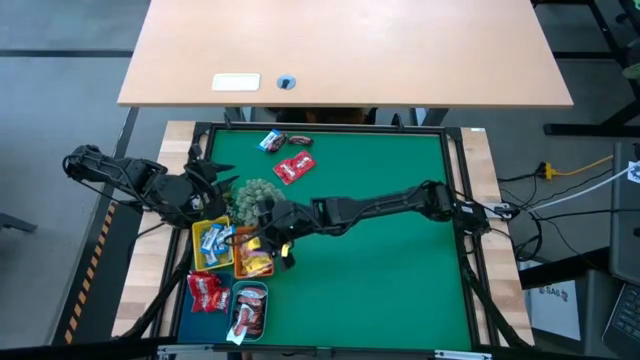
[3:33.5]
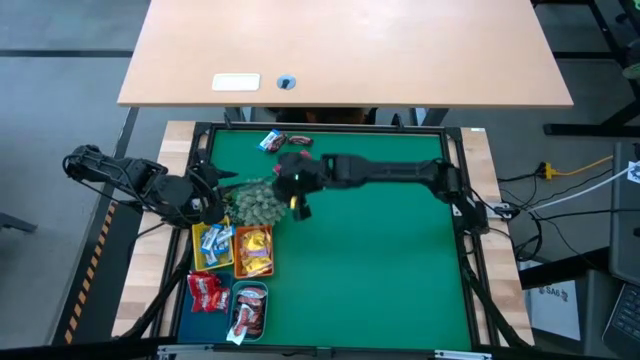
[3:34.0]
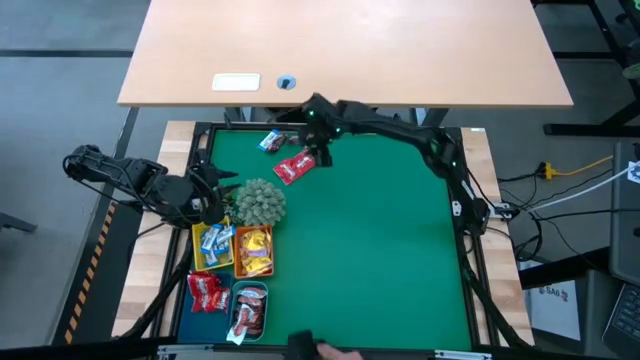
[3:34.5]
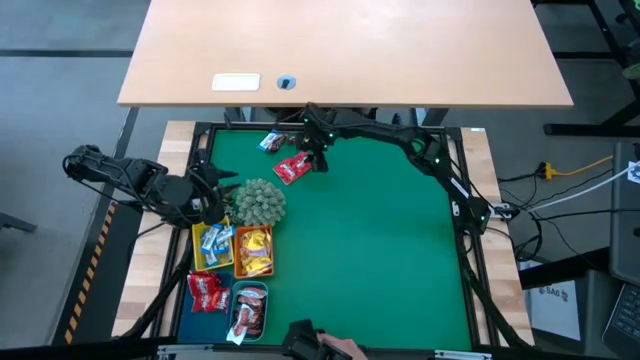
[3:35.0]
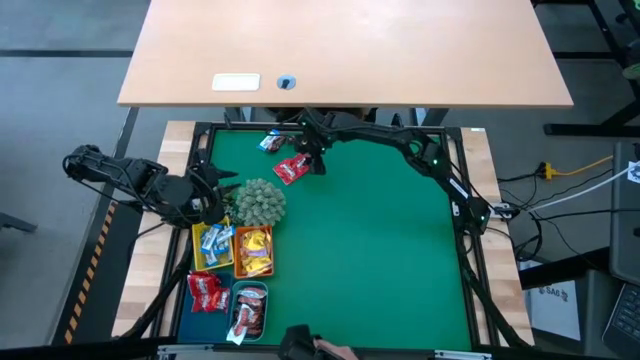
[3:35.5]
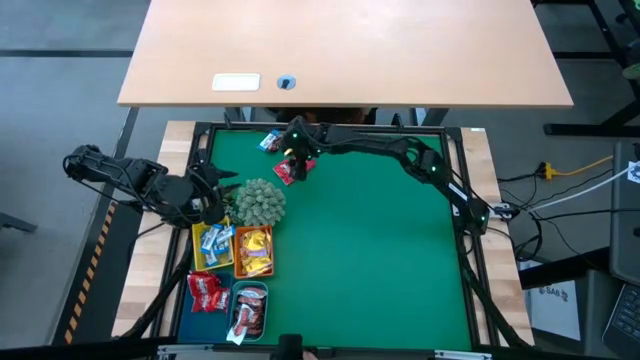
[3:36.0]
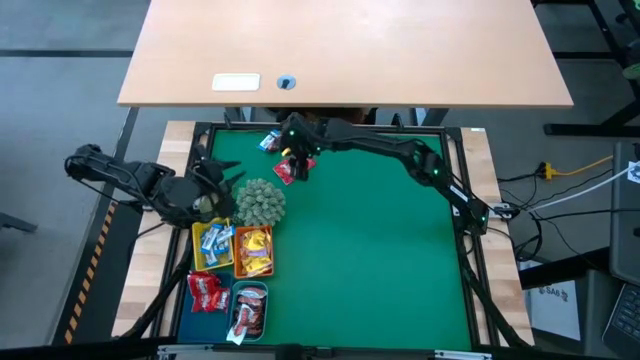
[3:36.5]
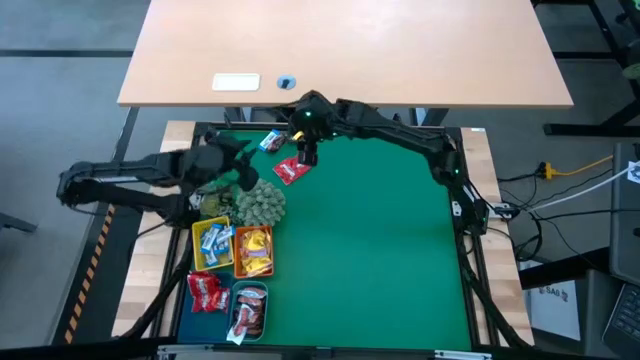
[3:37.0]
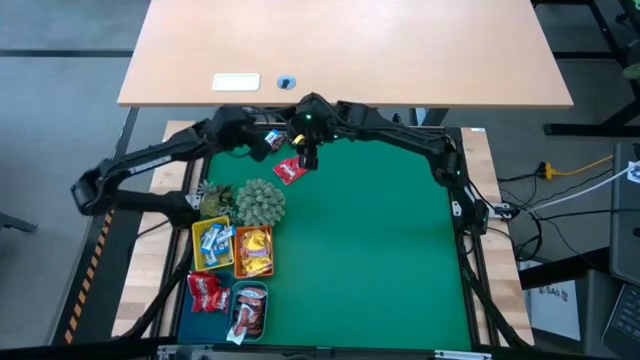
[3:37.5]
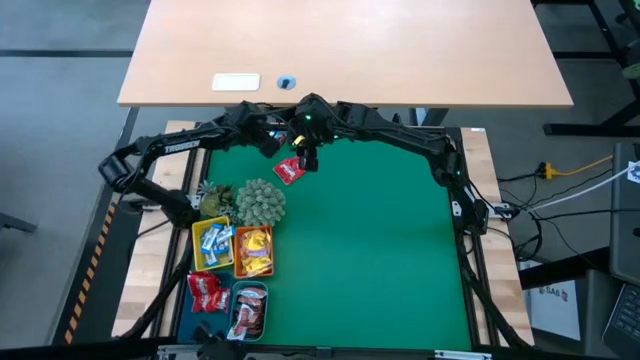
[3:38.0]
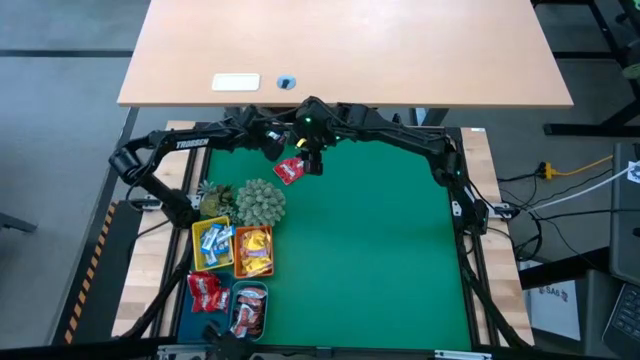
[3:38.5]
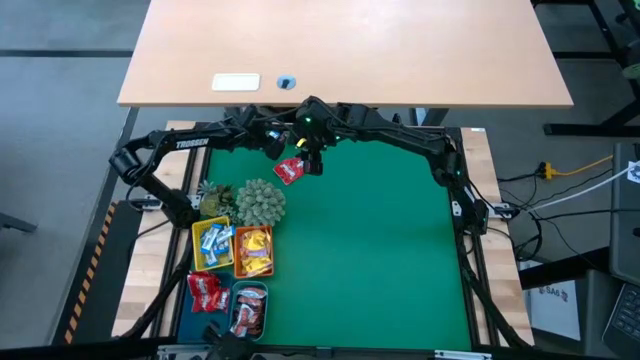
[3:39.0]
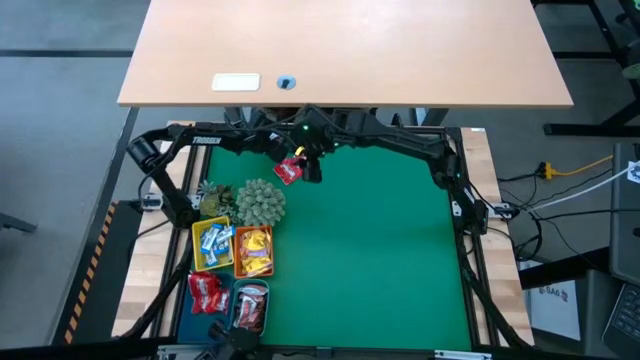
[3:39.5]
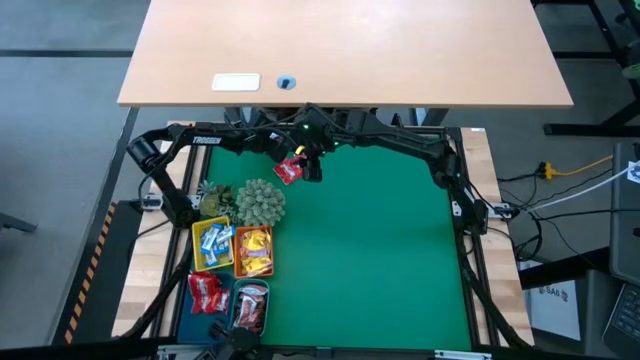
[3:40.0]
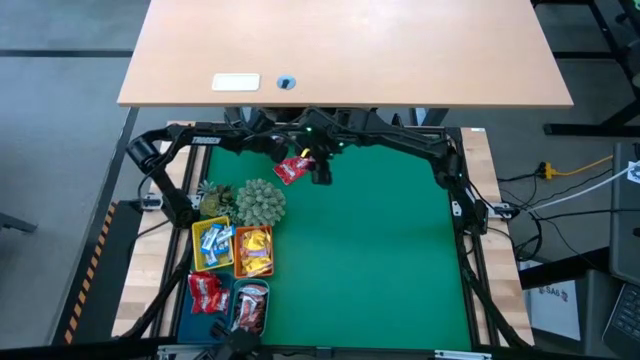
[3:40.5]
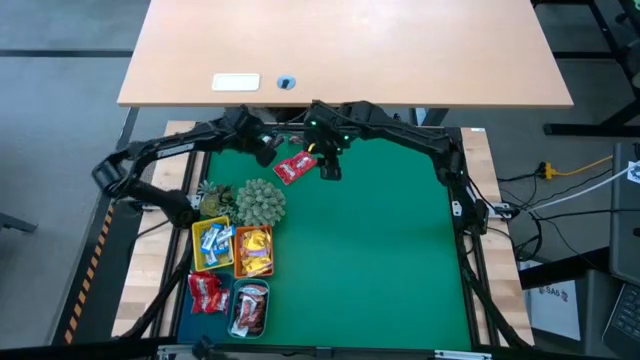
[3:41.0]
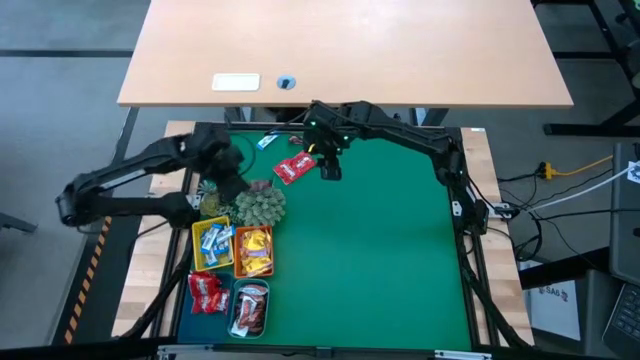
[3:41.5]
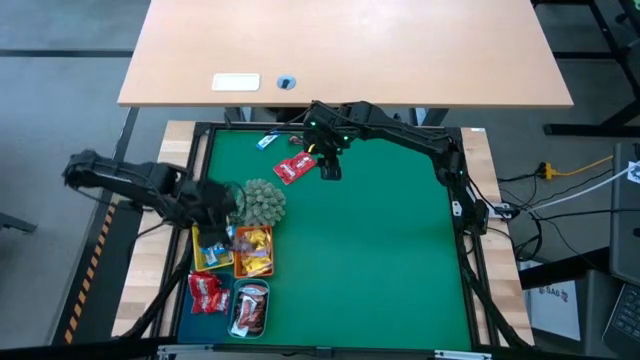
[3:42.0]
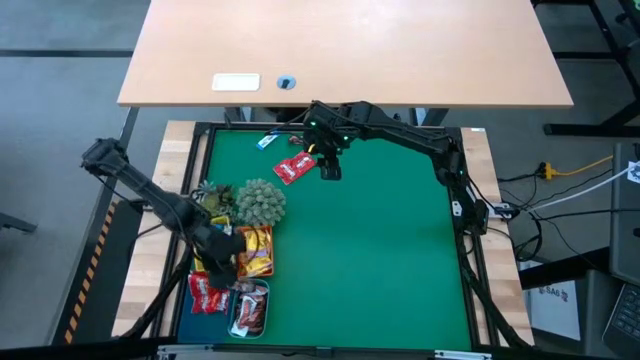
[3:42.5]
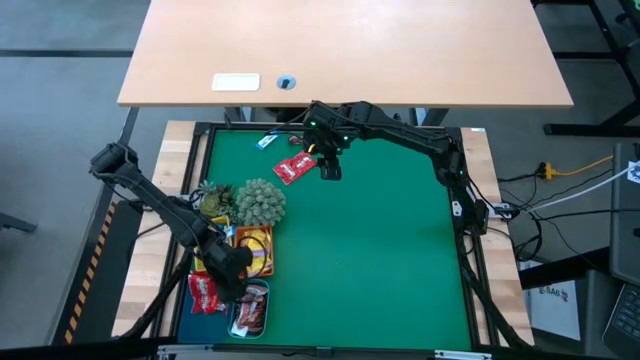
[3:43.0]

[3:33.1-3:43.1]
Task: Sort candy
Put the brown chocolate into the green basket

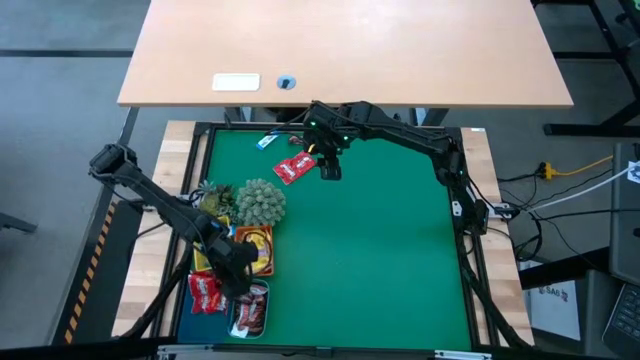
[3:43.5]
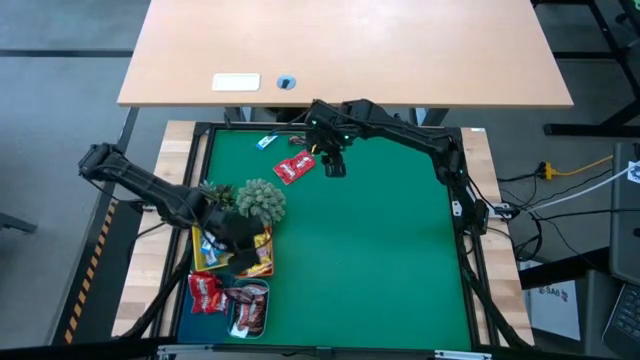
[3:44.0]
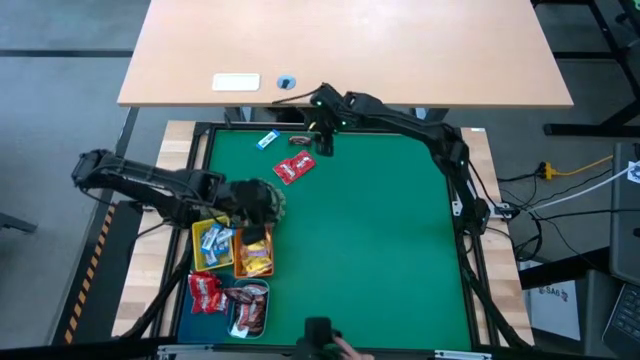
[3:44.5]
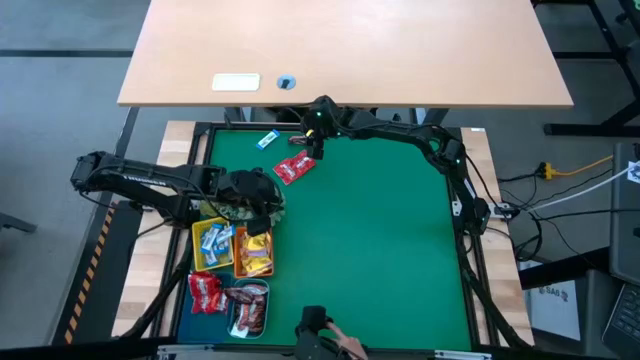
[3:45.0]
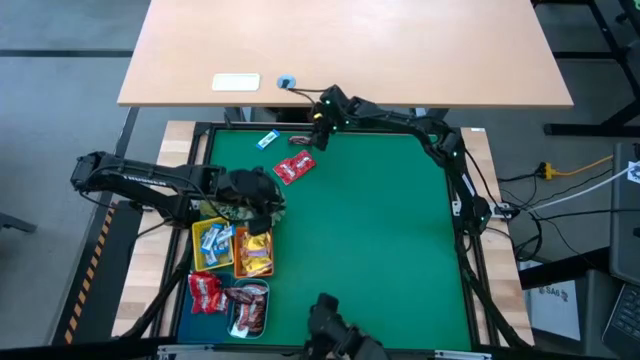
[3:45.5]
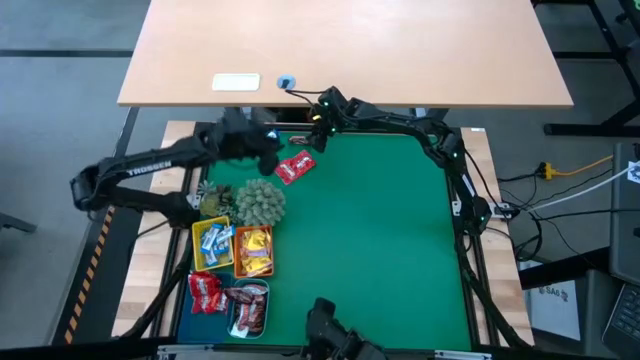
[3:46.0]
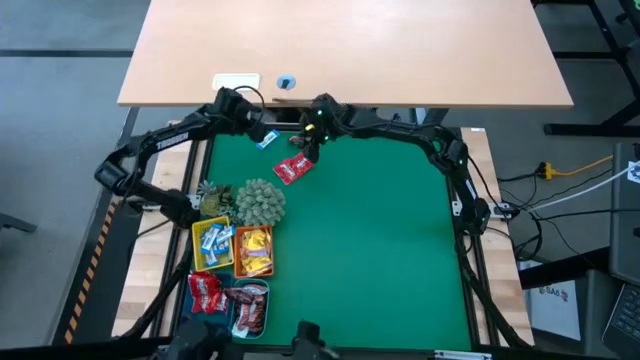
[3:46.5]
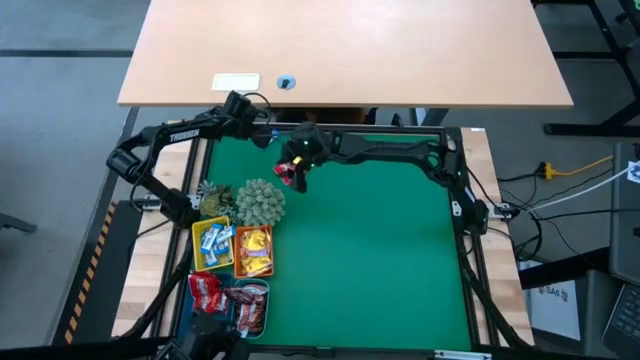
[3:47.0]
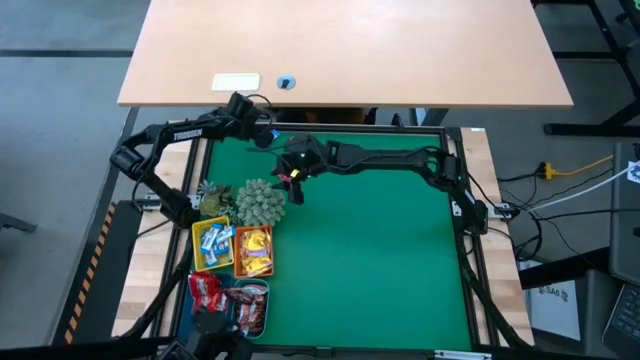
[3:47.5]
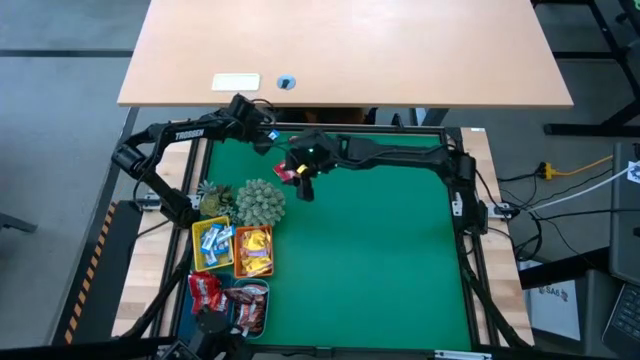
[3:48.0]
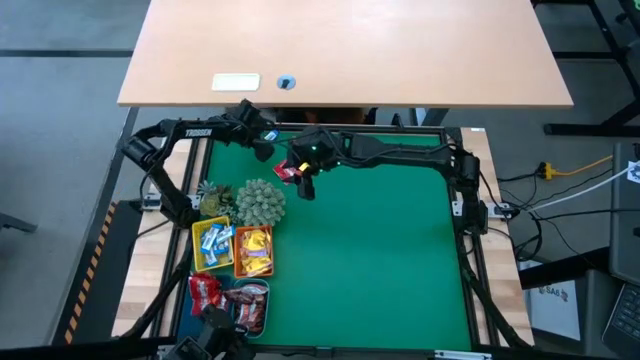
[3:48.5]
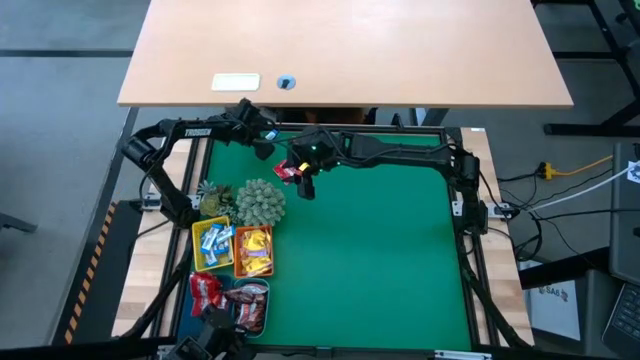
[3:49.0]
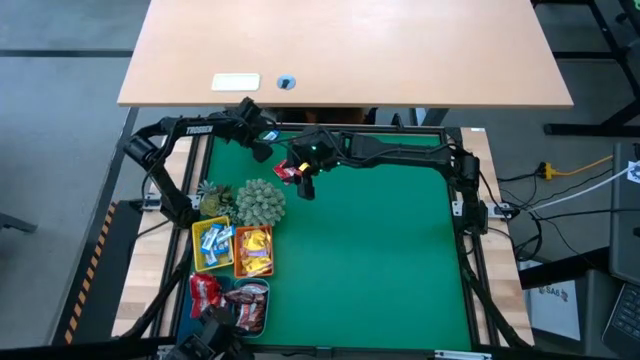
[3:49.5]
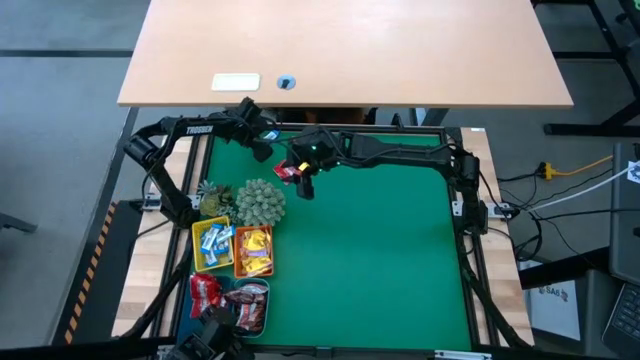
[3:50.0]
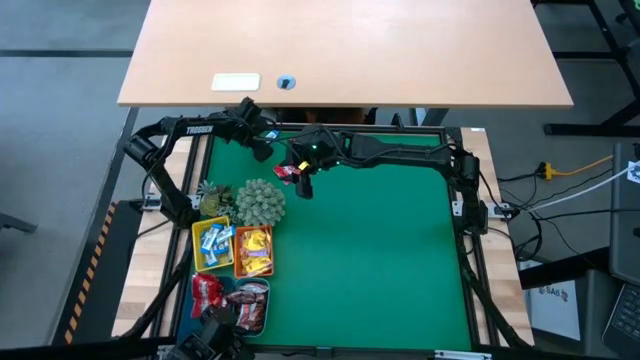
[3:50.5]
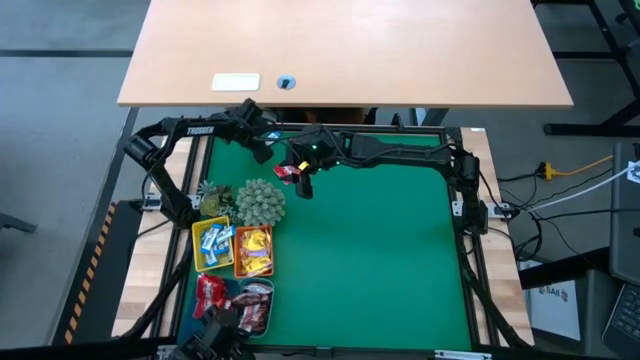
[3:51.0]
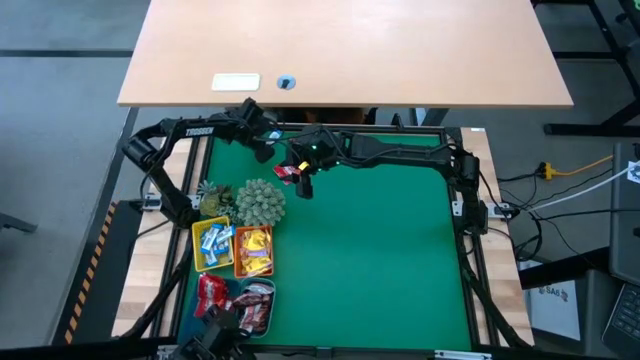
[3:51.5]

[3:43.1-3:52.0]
Put the white chocolate into the yellow basket

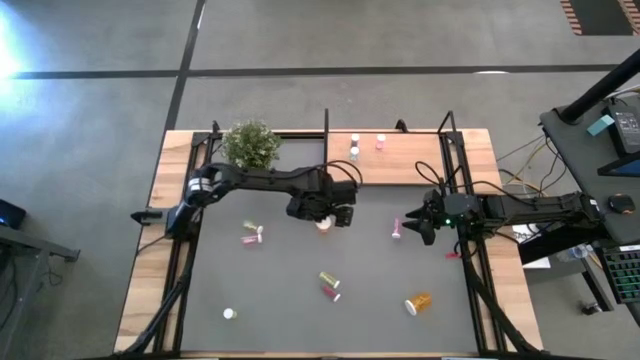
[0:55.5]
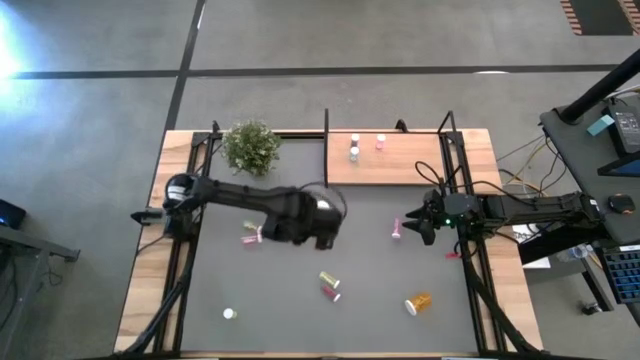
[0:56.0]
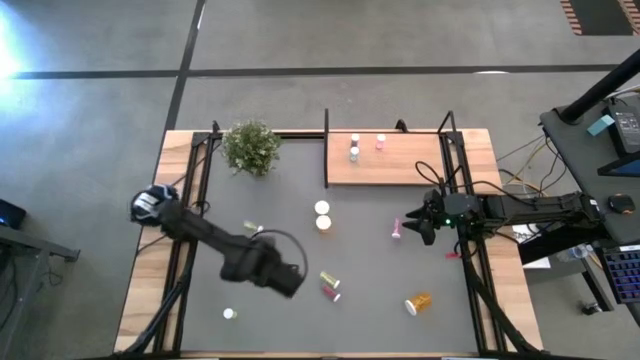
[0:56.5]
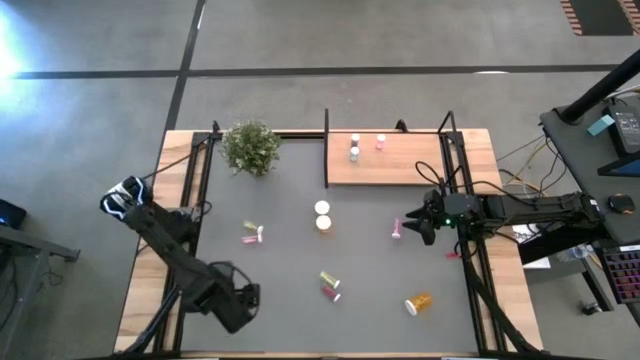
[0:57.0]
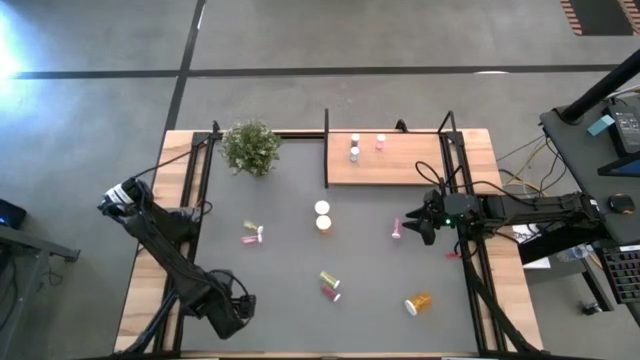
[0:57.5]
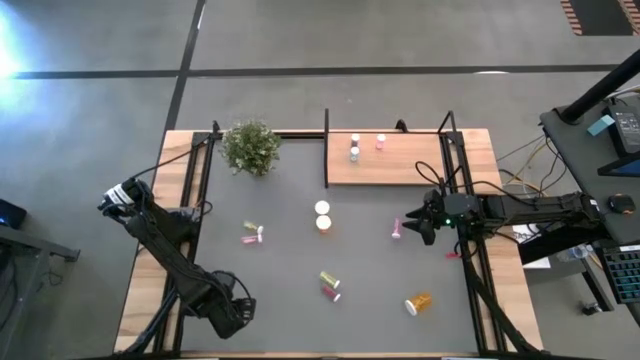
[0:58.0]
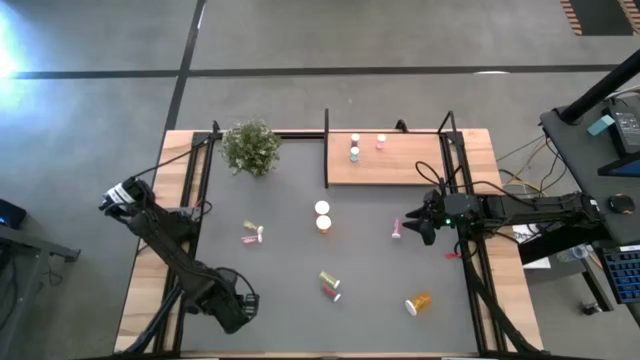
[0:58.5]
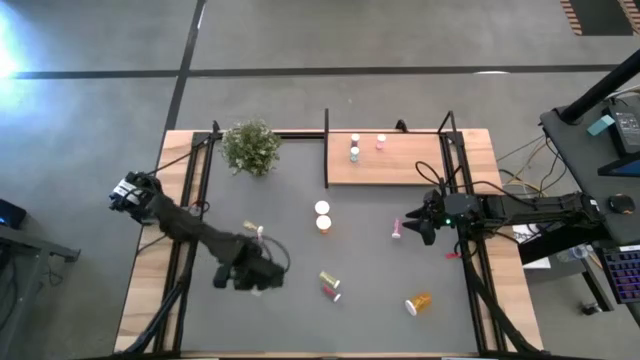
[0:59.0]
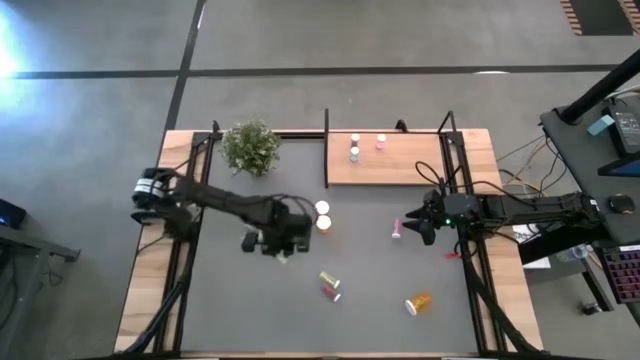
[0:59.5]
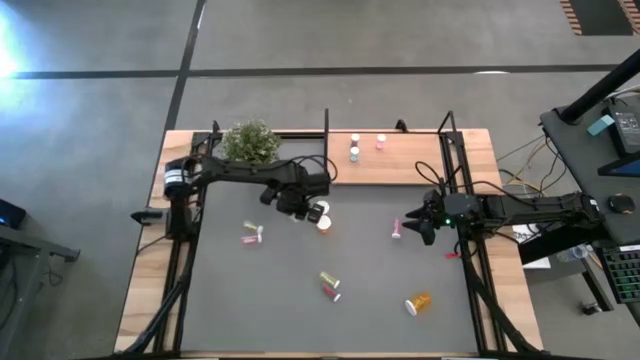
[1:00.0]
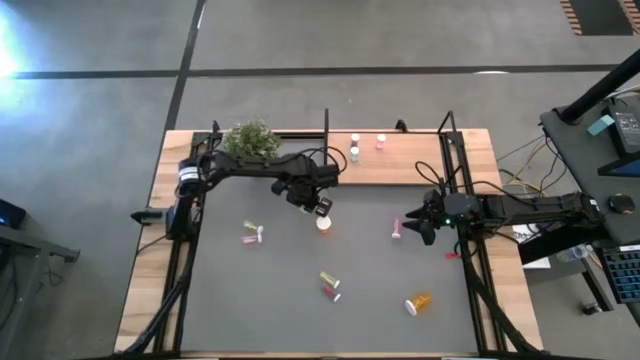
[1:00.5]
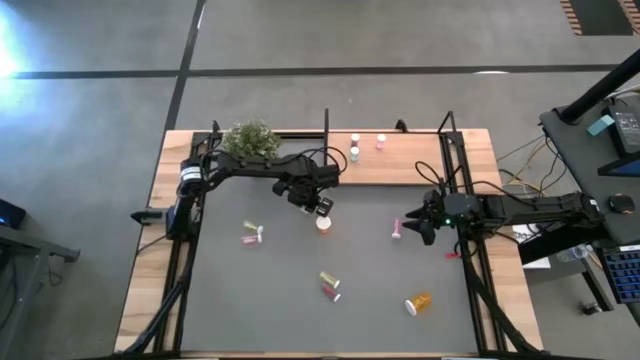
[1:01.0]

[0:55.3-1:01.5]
Task: Pick and place medicine bottles onto shelf by color
Move the bottom left yellow pill bottle to the middle of the table
